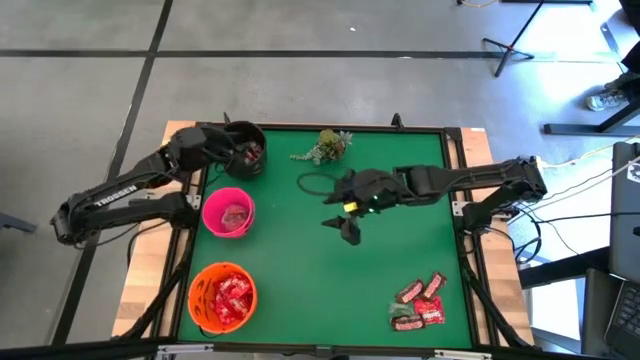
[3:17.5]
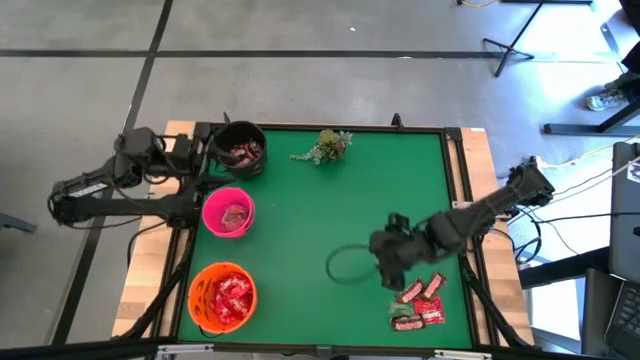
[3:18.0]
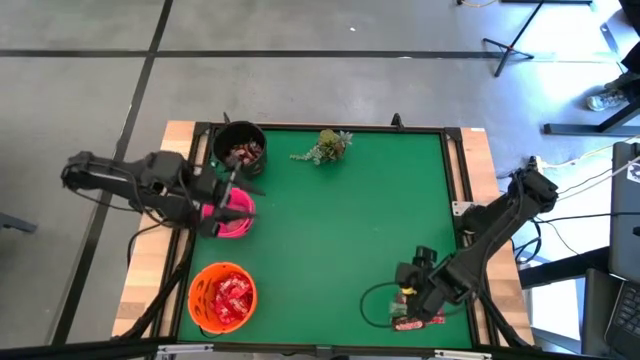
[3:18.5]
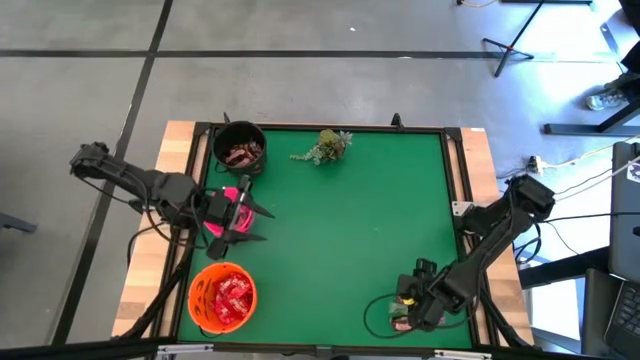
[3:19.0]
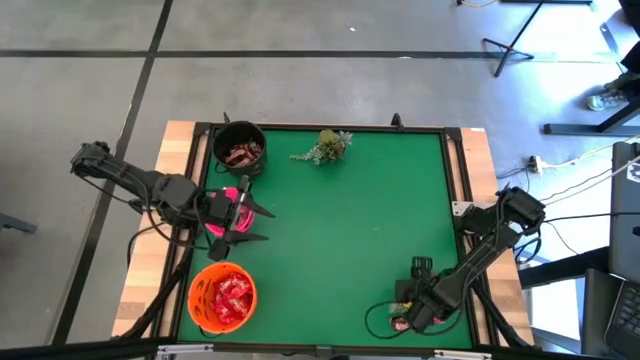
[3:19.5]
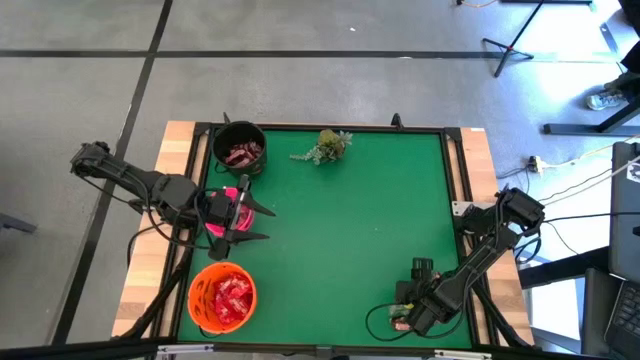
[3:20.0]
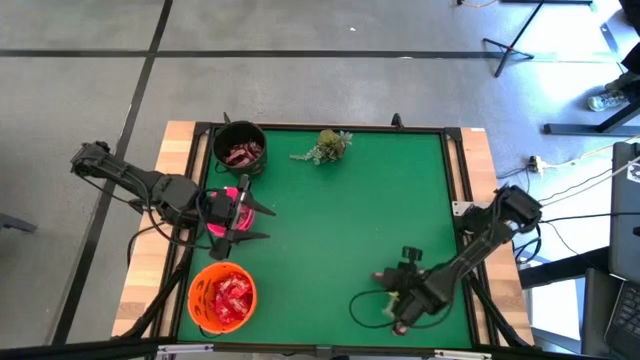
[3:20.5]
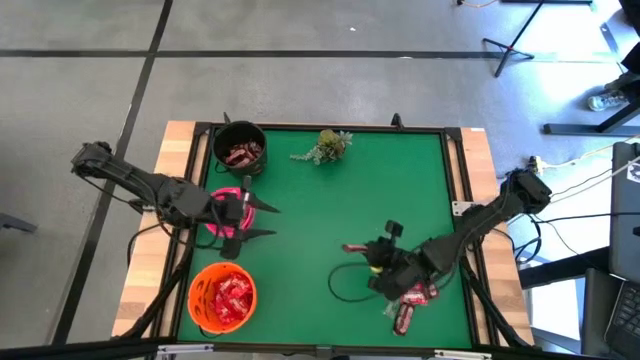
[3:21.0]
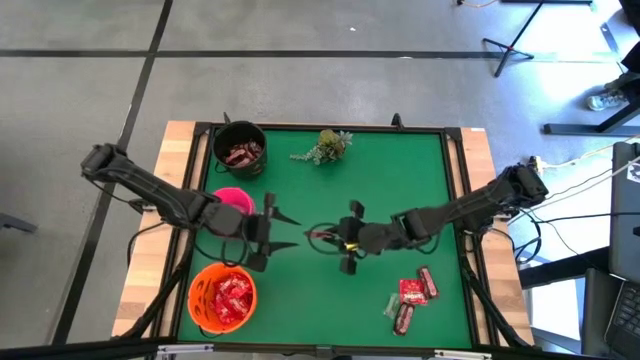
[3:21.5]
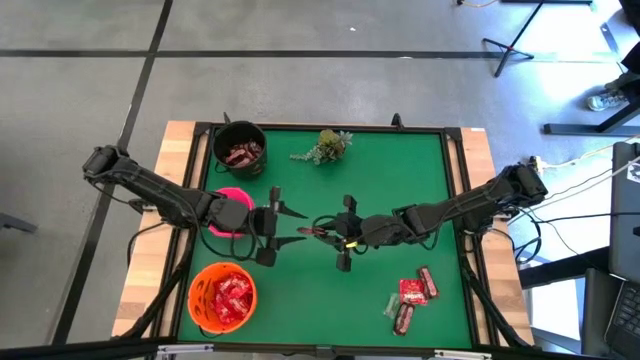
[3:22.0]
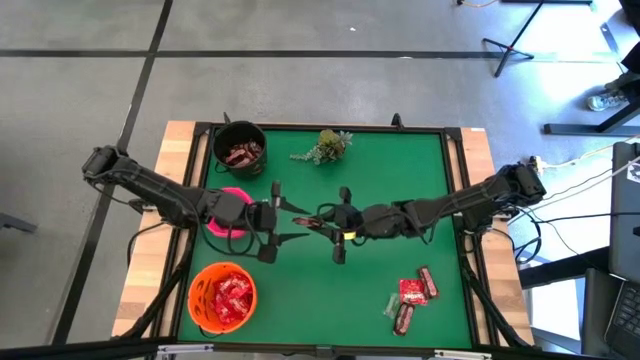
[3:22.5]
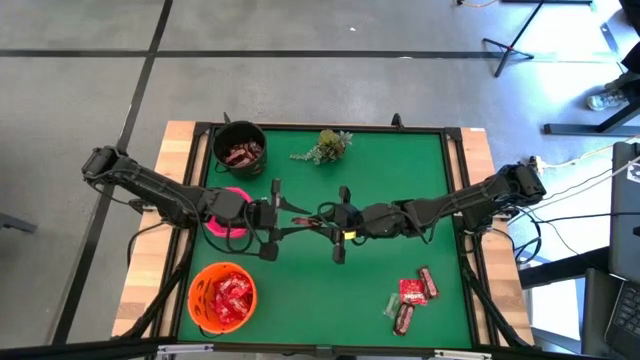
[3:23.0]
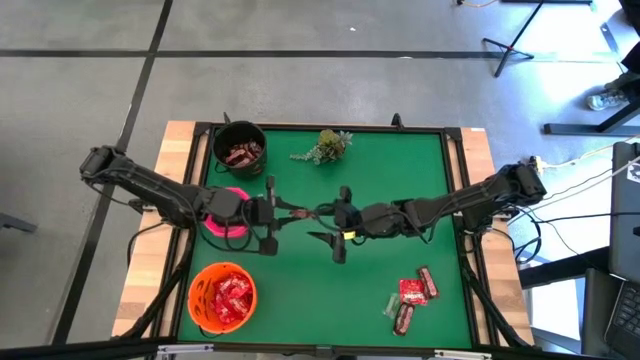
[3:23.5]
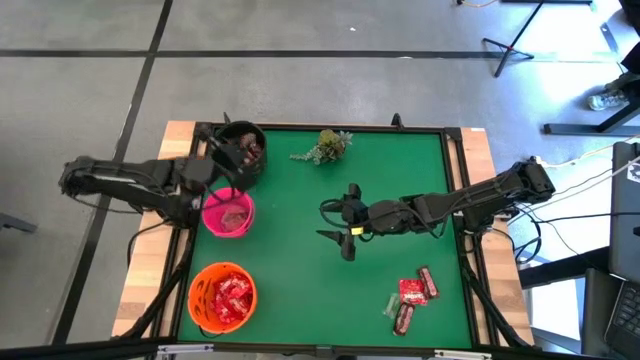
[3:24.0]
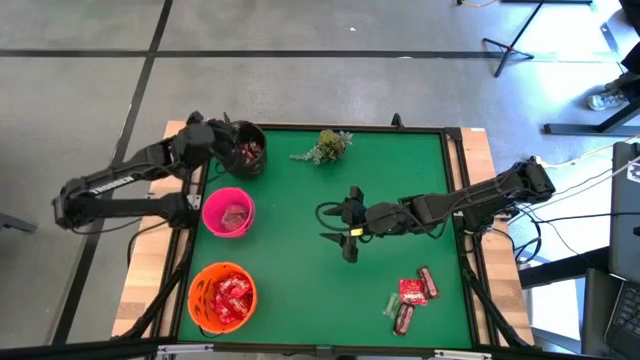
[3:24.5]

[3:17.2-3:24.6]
Task: Sort candy
Put the brown chocolate into the black bucket

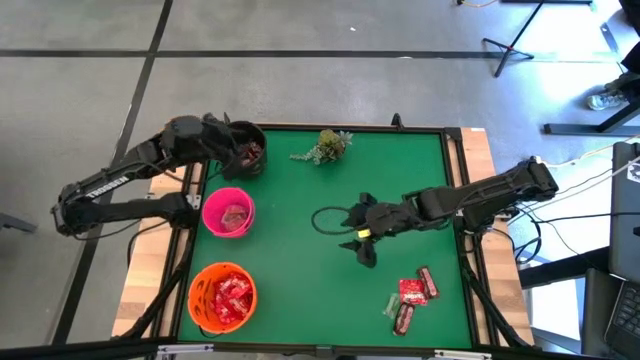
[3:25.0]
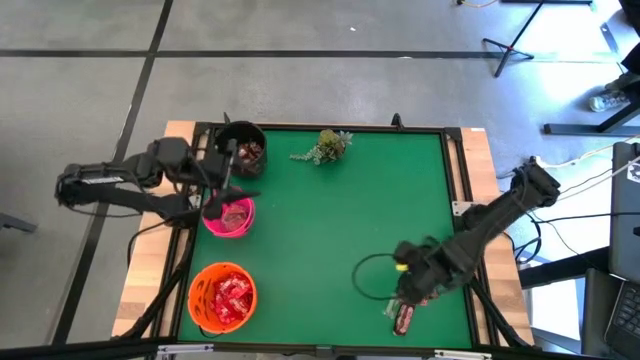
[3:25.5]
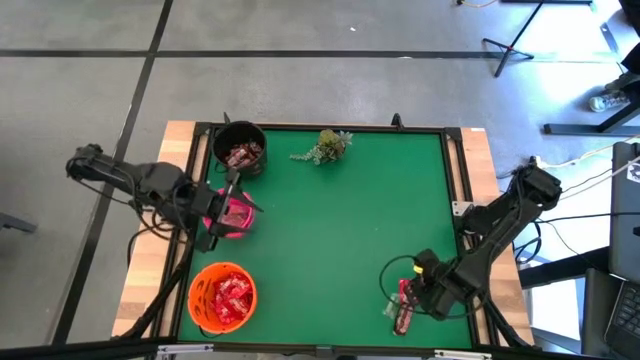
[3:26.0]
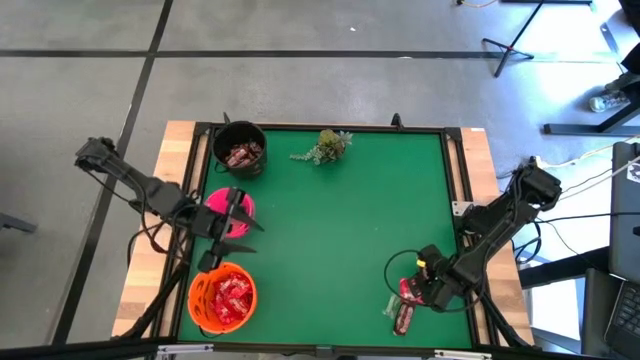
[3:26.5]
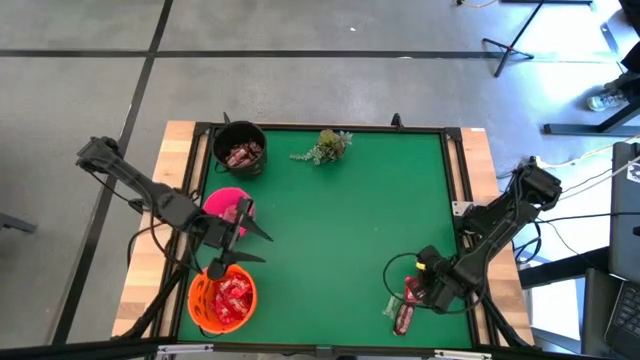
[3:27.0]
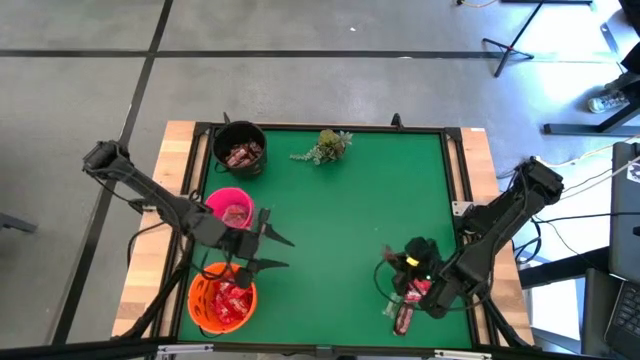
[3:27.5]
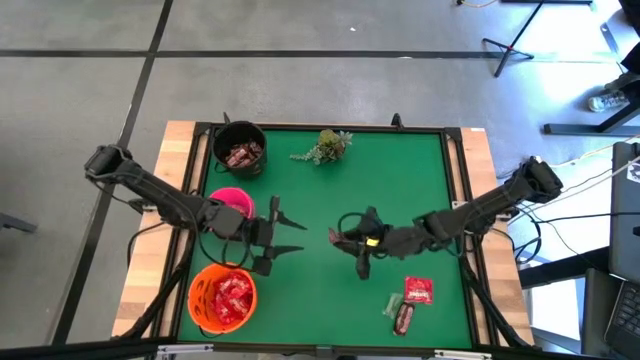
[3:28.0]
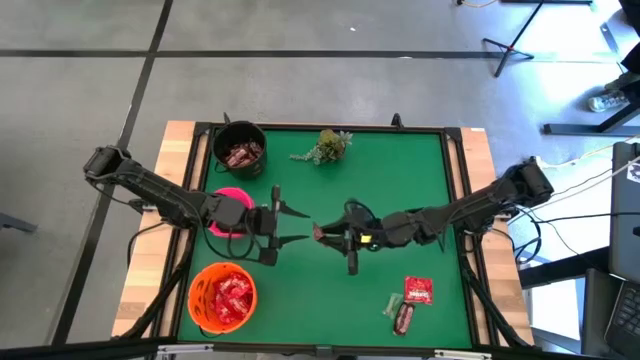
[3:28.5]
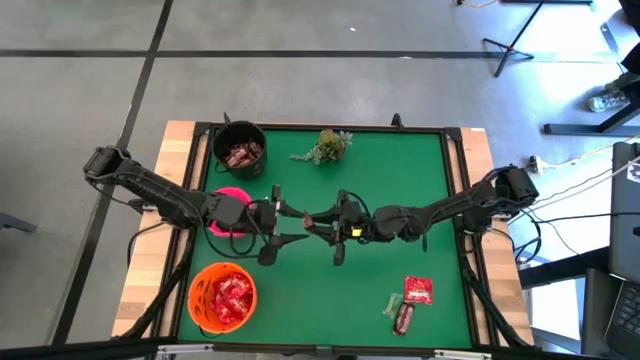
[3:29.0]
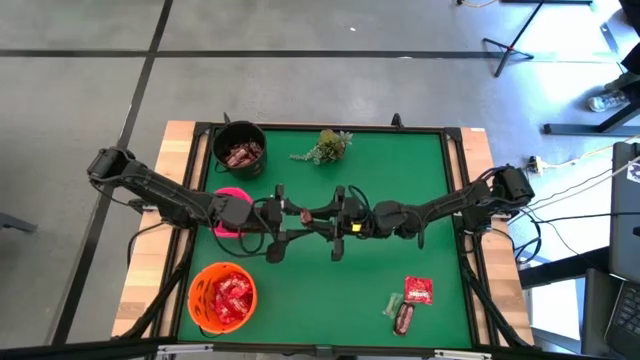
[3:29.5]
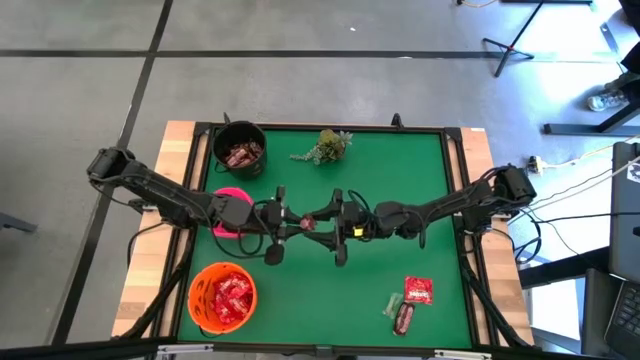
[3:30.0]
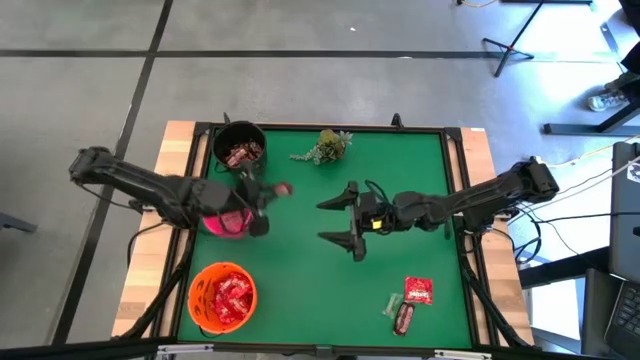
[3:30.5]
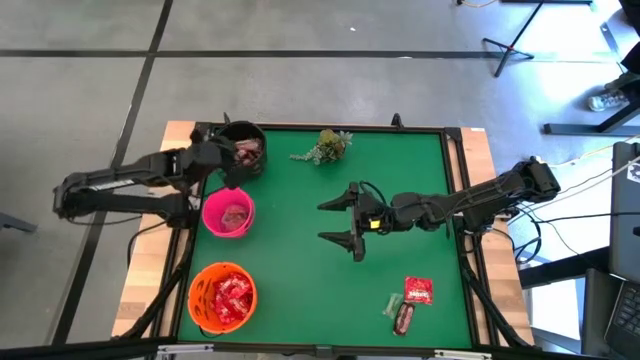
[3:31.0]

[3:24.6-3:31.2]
Put the brown chocolate into the black bucket

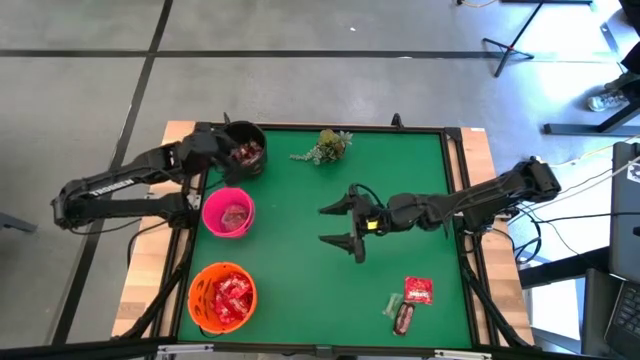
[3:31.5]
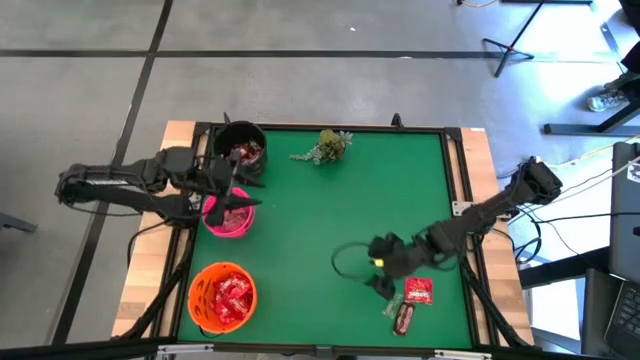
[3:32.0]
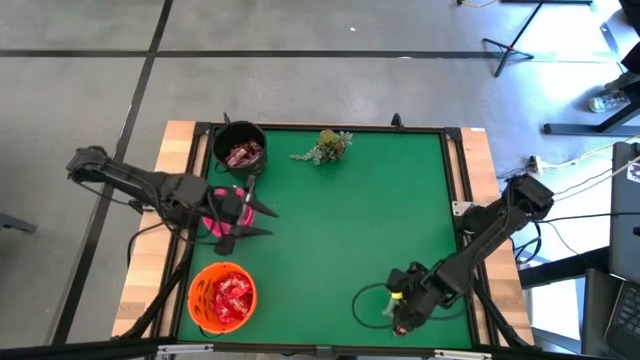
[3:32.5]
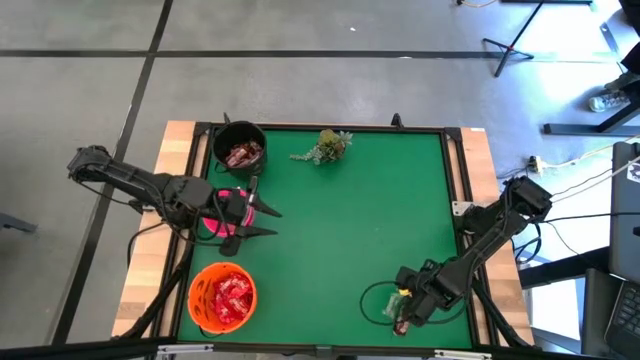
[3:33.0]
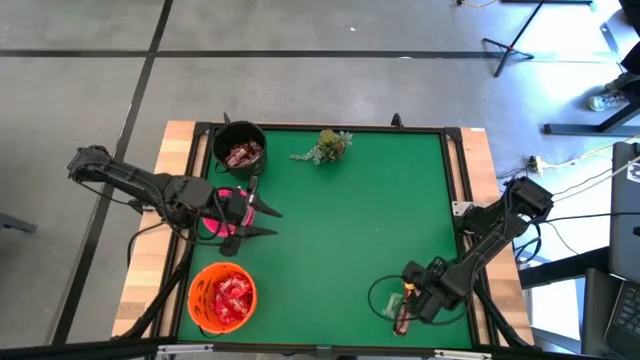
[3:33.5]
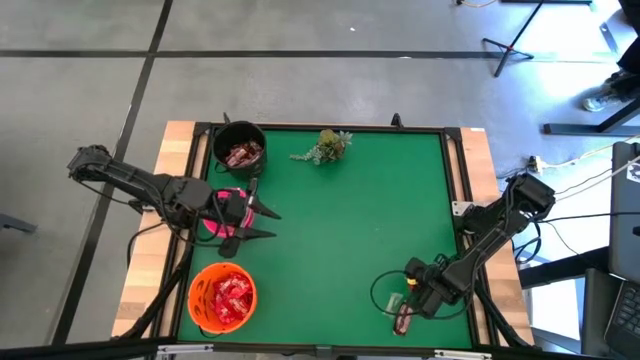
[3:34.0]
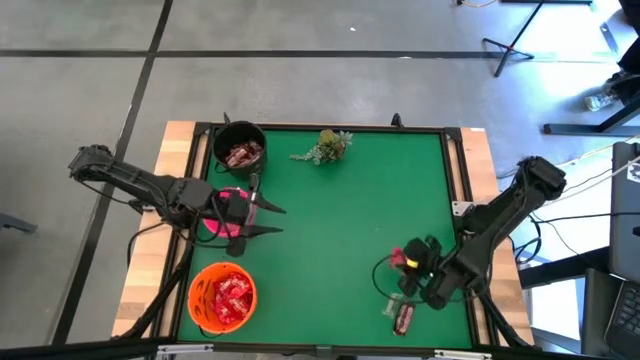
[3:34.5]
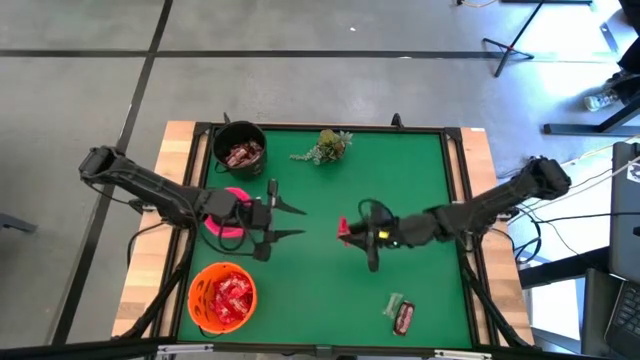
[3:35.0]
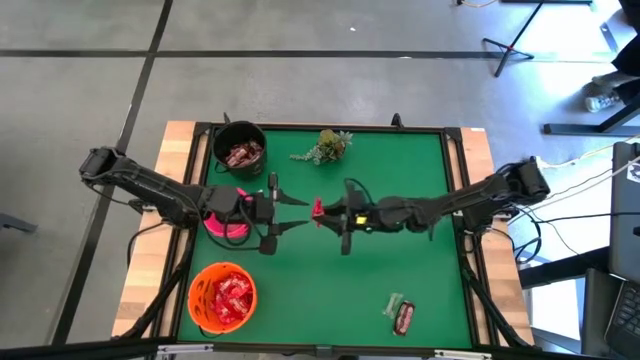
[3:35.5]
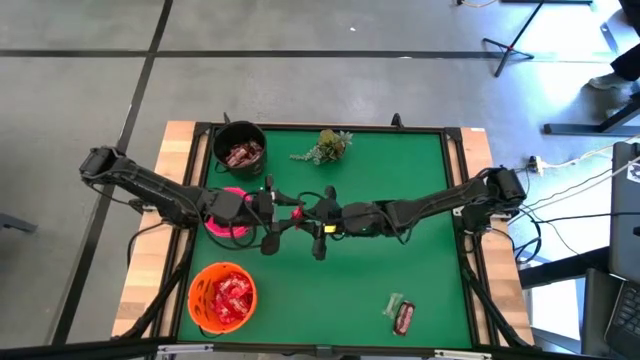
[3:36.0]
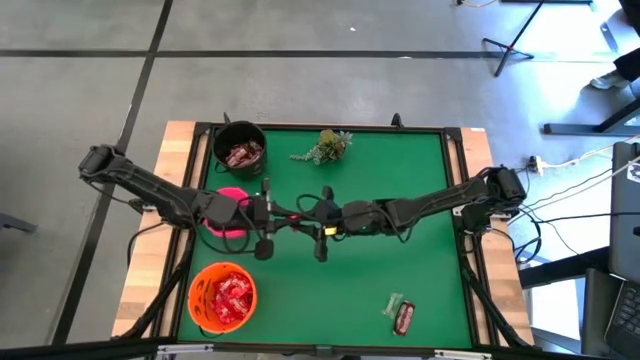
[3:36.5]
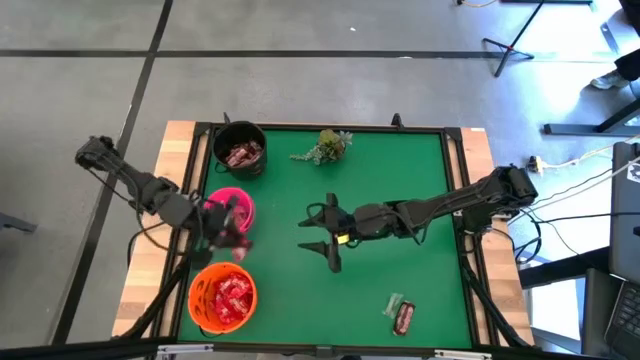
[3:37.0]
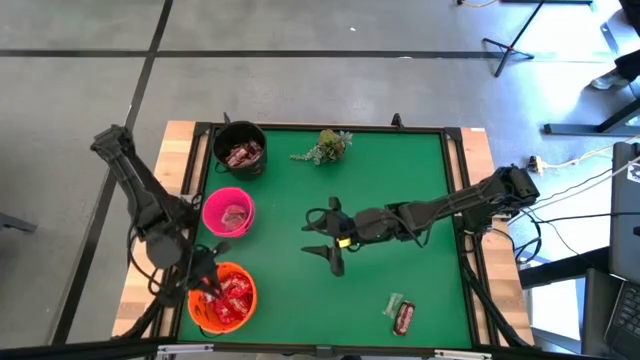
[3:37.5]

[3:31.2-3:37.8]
Put the red candy into the orange bucket
